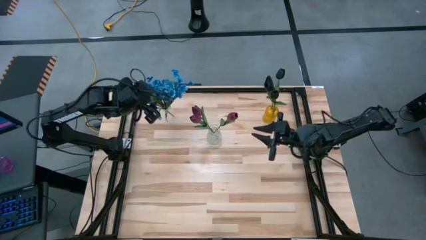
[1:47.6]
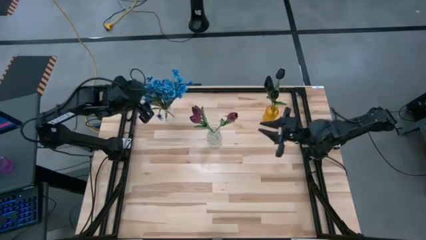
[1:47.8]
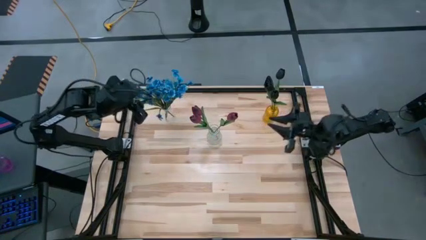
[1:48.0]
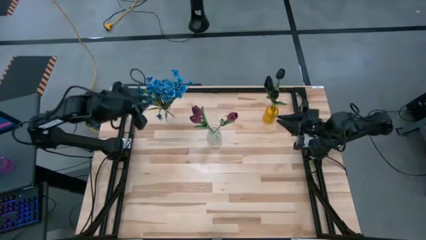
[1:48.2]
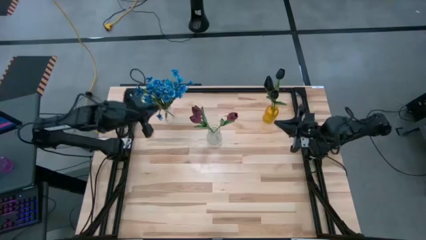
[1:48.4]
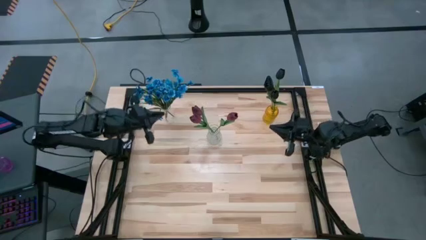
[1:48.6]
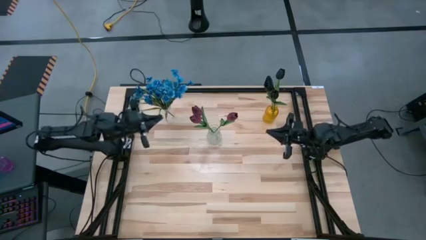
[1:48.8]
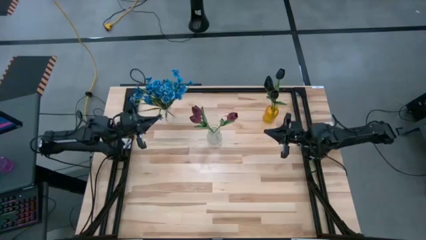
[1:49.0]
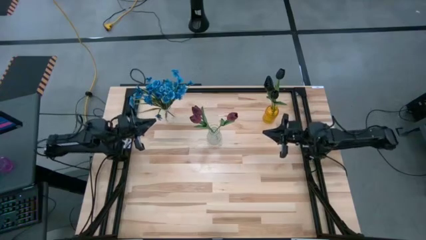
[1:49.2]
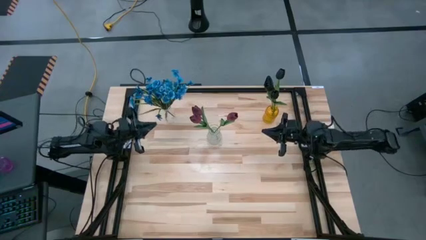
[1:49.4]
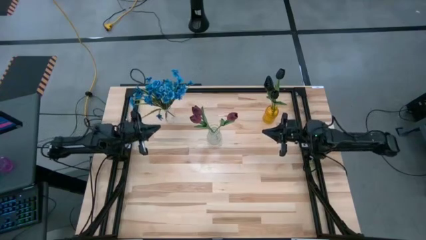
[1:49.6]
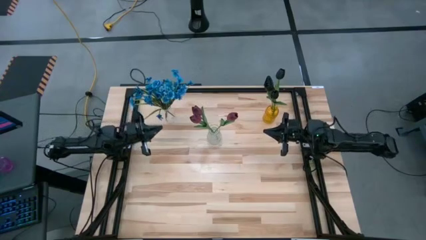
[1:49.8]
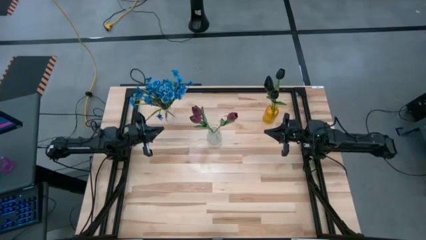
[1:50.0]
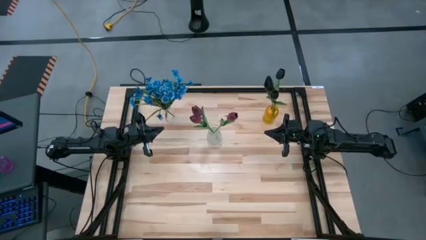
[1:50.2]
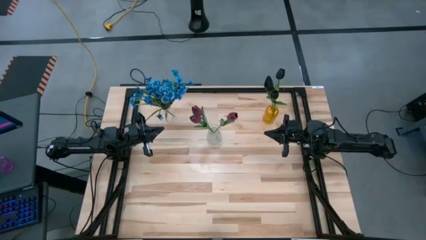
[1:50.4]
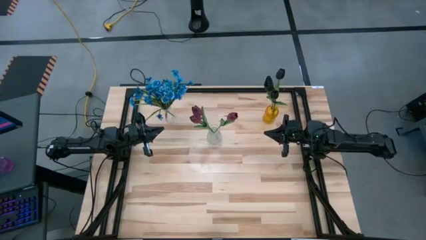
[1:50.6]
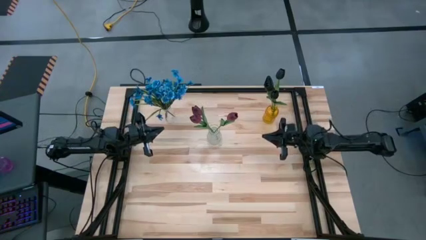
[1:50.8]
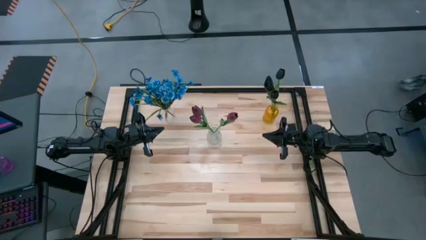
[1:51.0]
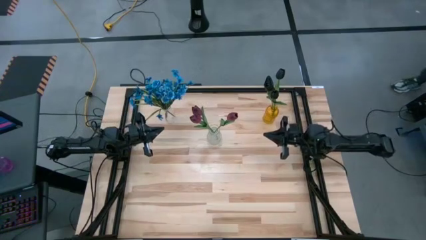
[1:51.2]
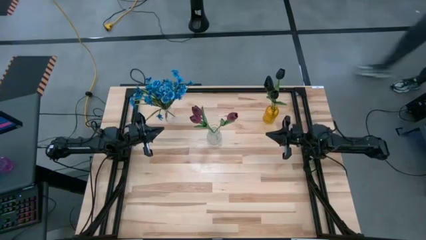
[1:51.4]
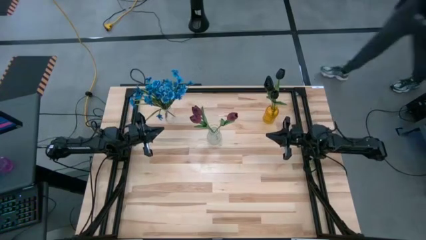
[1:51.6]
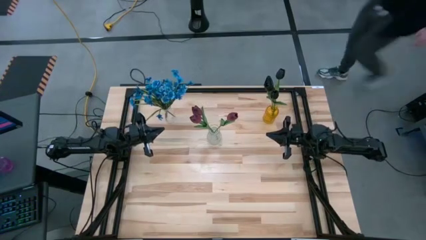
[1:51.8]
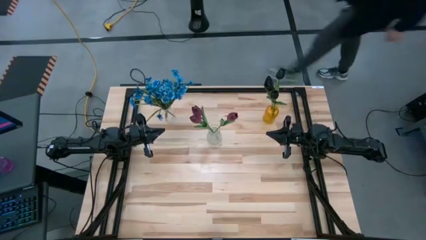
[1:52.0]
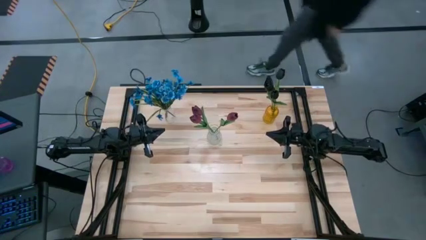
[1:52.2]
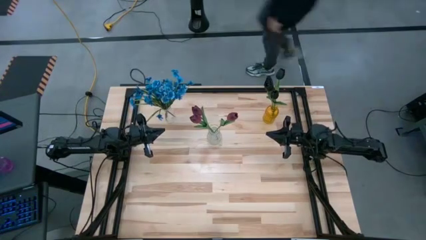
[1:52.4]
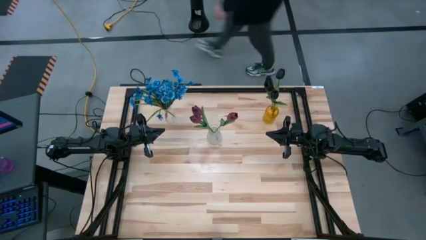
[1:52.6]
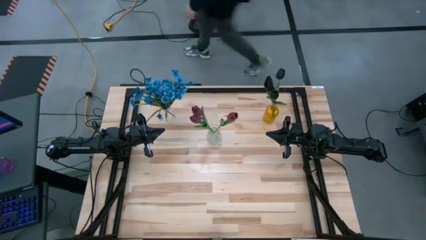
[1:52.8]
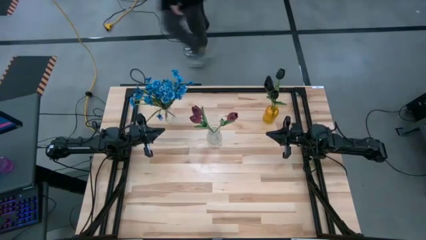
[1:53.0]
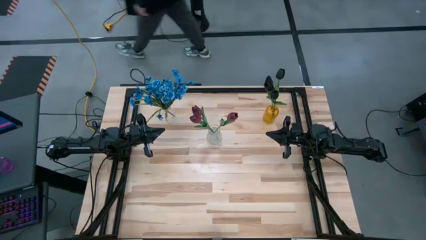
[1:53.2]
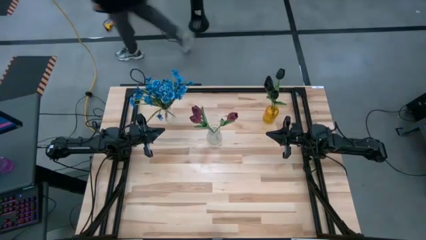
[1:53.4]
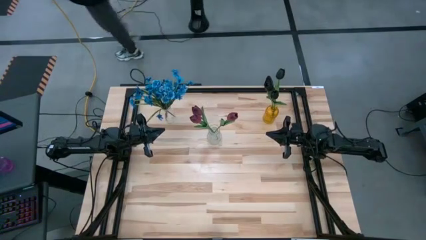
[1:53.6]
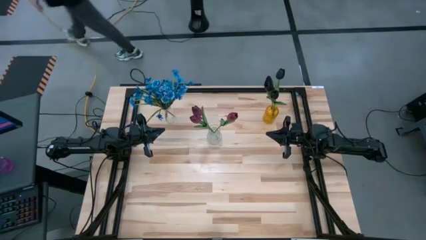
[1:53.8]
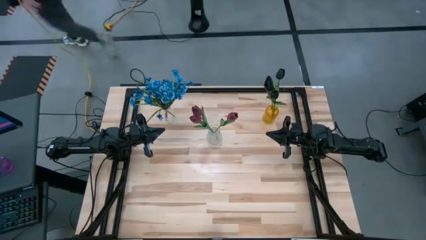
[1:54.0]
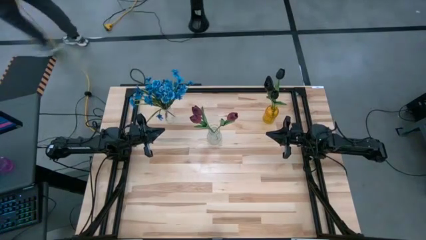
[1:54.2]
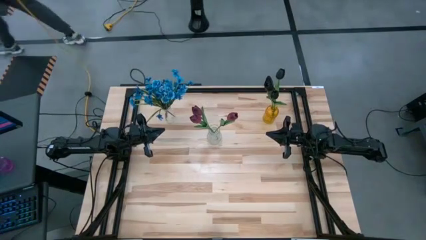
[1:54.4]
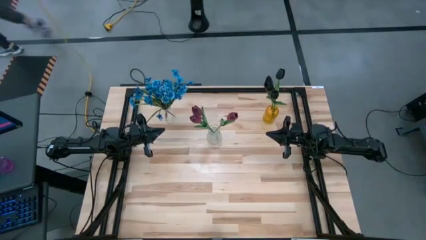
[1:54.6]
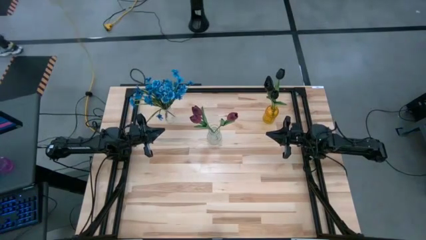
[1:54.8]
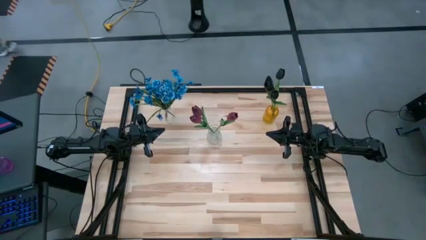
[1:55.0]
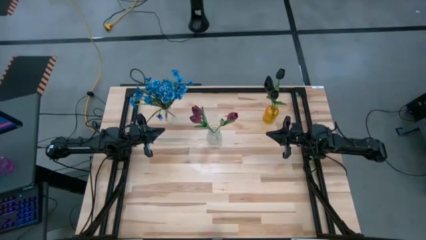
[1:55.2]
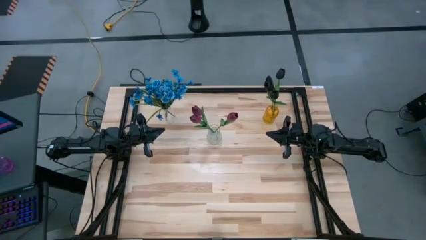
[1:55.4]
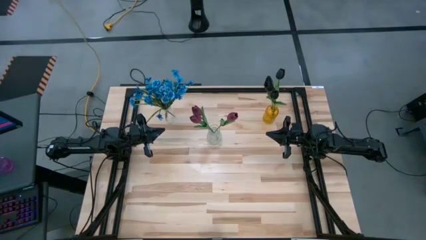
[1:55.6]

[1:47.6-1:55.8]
Task: Sort flowers into vase by color
Return to Home Position

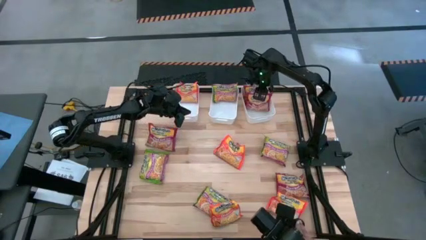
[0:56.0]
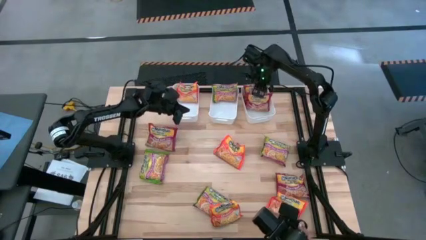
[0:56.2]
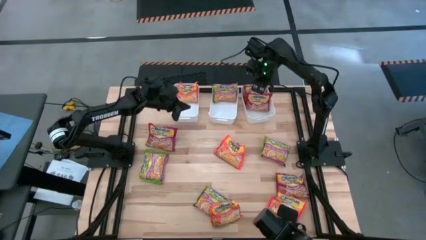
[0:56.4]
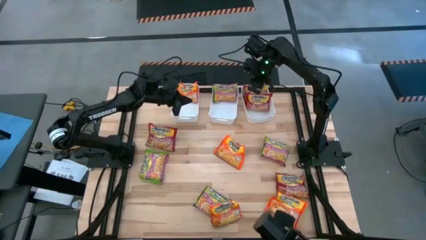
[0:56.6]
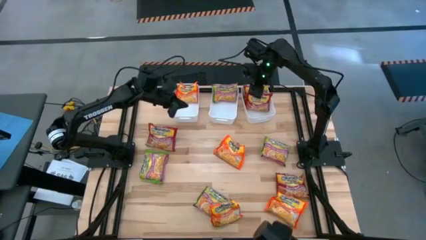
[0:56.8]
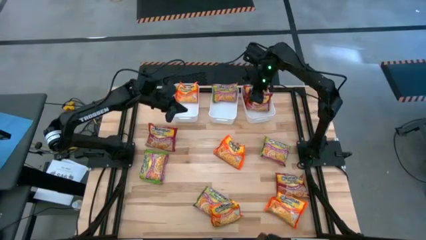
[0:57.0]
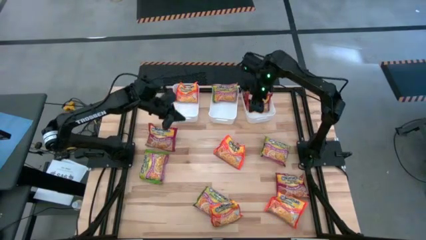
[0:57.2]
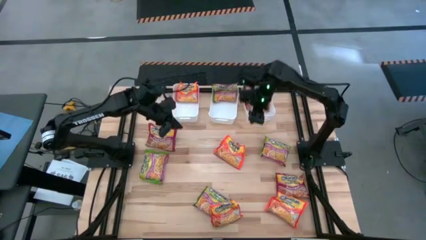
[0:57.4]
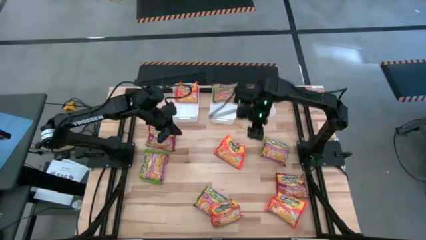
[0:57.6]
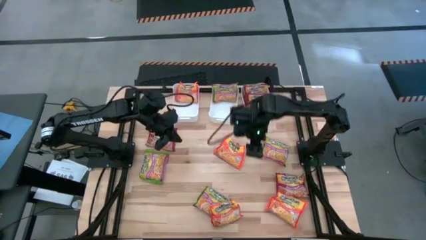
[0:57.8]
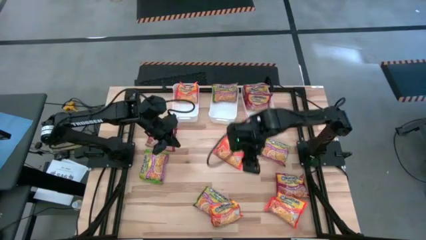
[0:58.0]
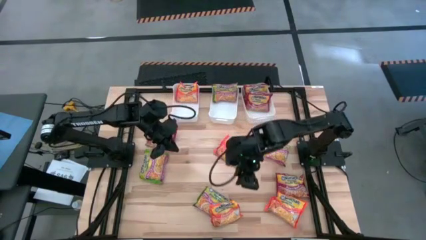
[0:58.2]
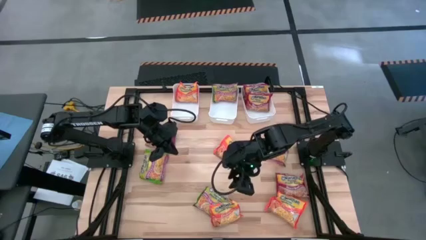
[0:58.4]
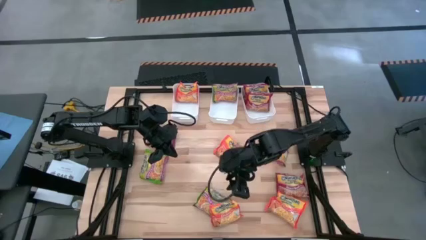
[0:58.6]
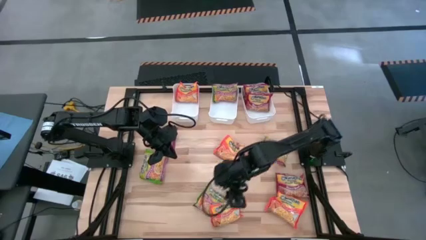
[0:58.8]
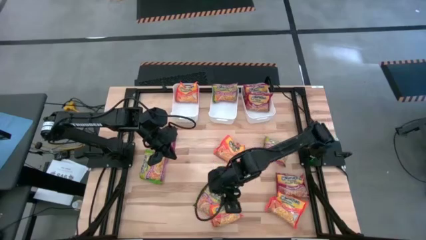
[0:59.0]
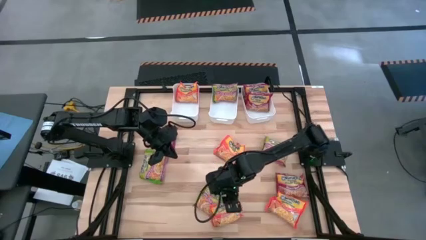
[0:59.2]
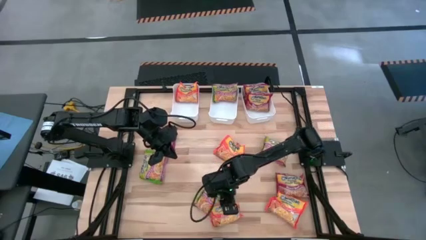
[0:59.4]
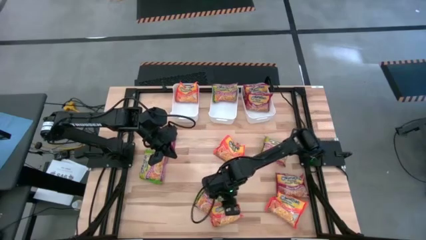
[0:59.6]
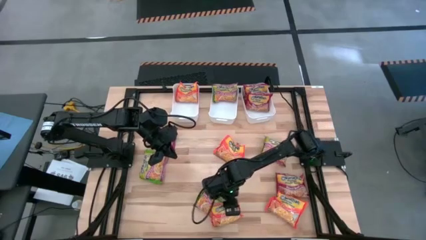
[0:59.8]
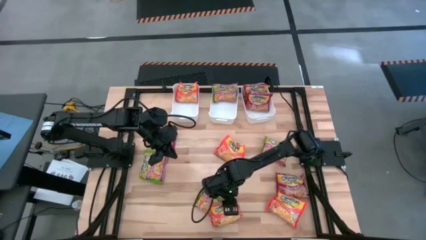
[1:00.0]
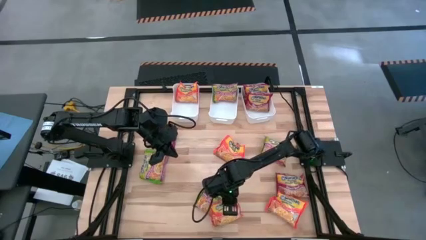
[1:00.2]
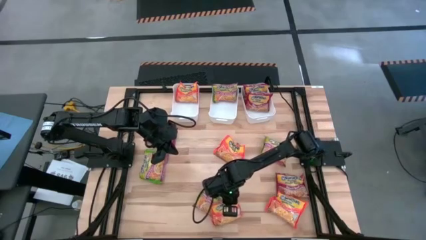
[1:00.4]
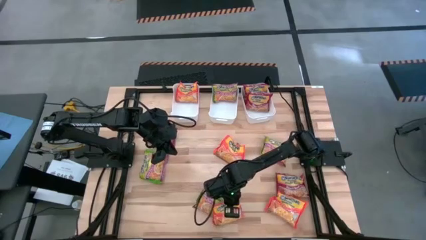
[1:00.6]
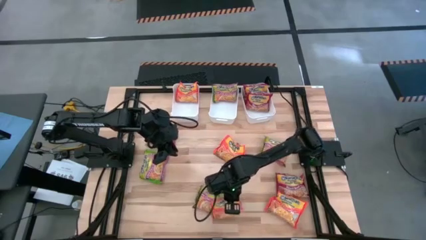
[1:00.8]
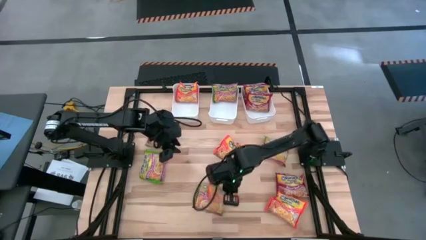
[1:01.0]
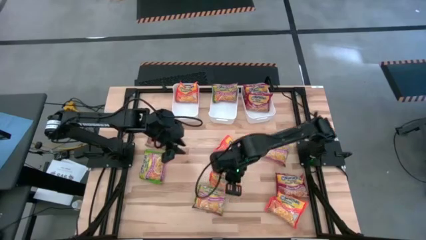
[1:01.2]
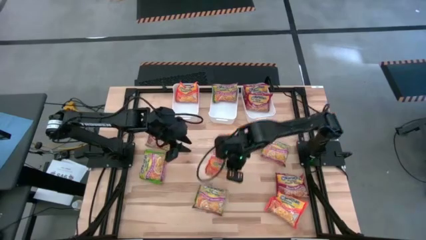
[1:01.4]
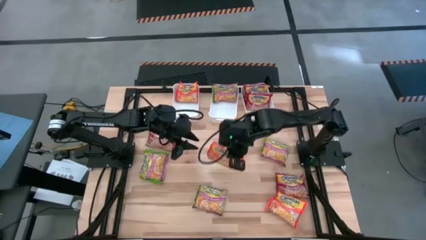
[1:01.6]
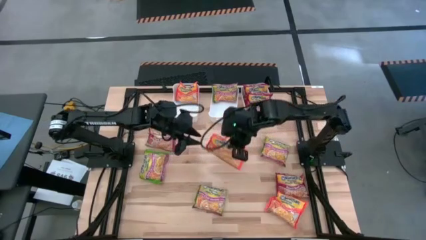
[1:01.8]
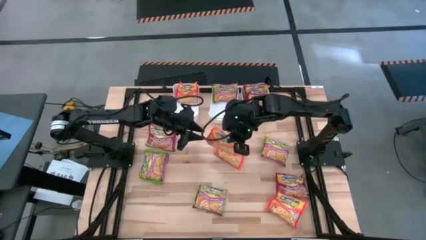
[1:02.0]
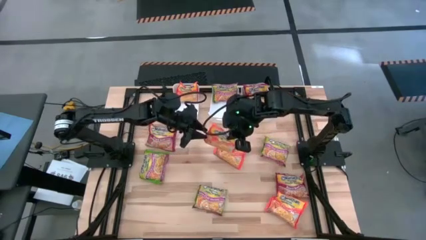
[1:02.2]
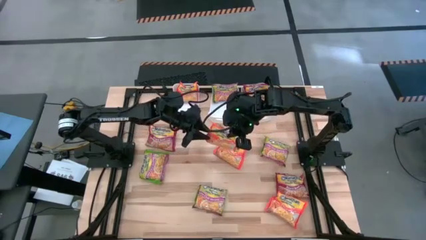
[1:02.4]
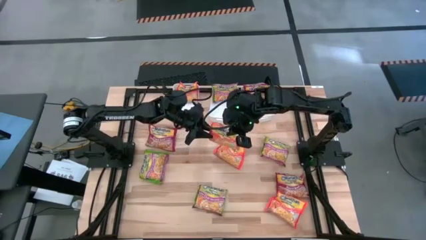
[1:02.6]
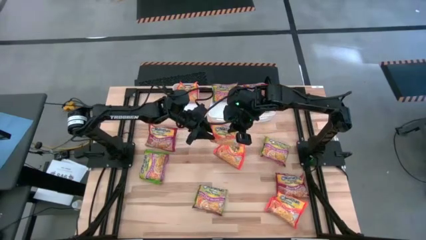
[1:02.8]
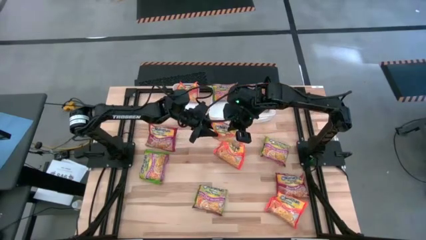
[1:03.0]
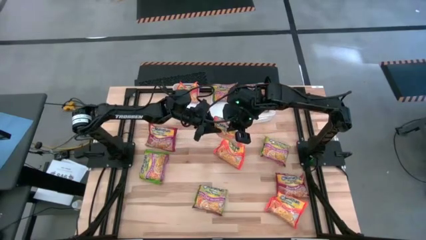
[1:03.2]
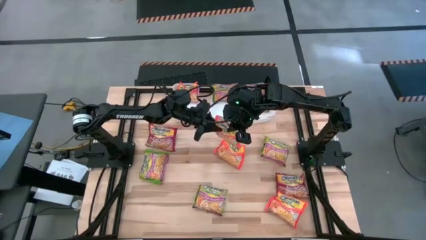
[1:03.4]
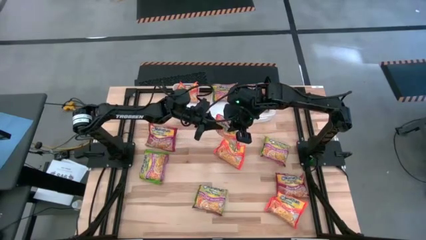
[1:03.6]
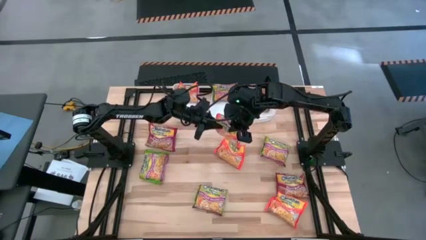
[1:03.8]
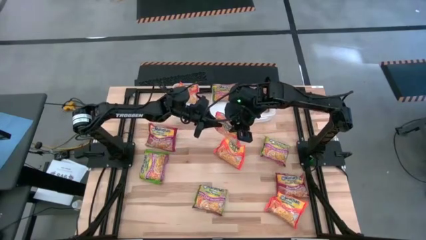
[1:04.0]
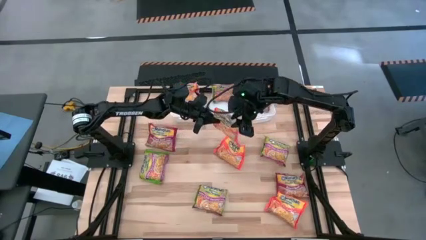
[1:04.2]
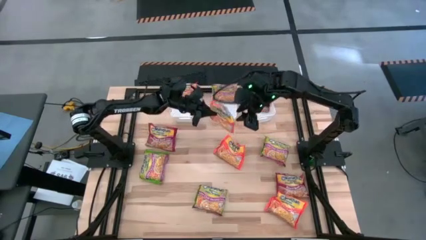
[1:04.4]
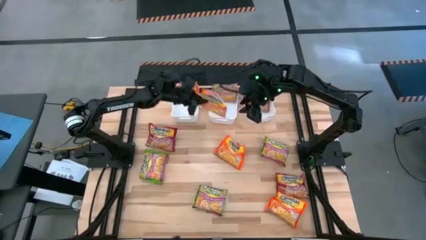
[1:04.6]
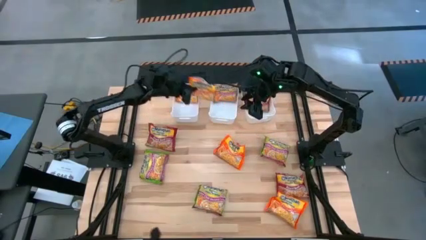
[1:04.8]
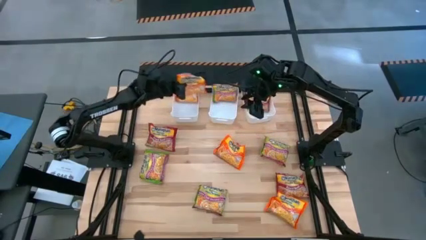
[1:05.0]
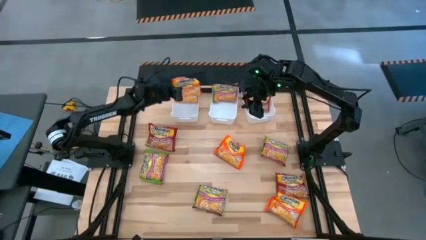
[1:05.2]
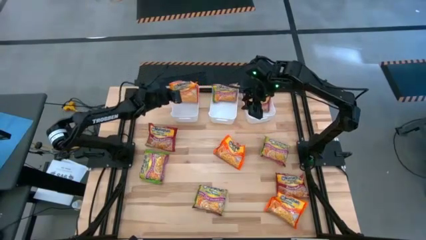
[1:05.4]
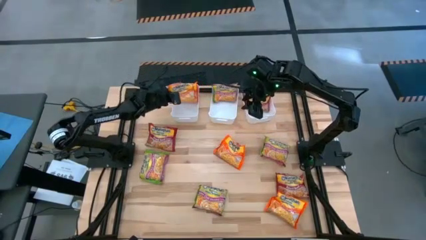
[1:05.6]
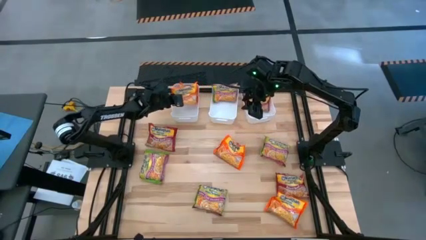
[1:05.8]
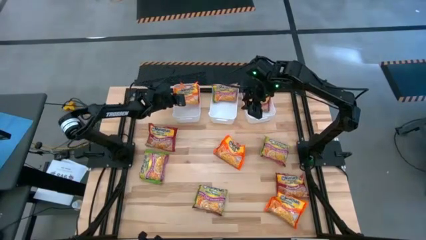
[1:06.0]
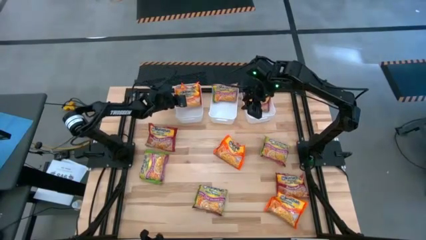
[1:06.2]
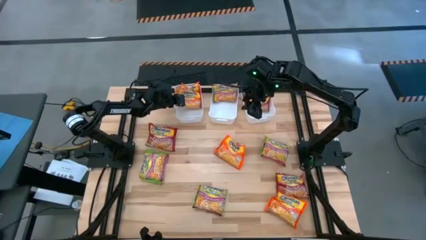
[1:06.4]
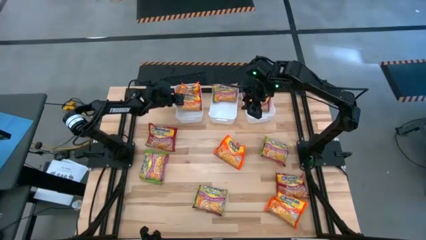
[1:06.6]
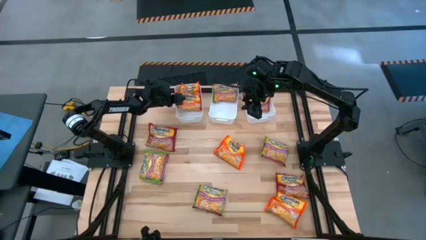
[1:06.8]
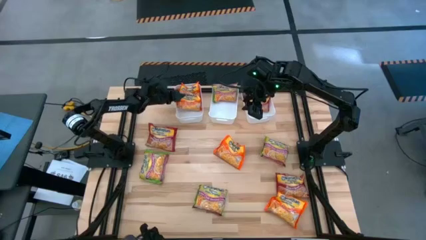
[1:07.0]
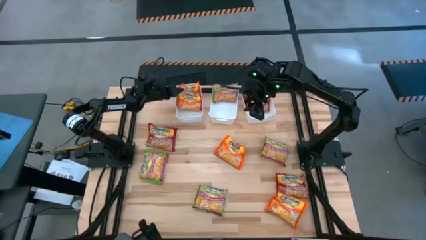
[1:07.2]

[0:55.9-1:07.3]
Task: Sort Maruchan noodles
Put the orange noodle pack into the left white bin
